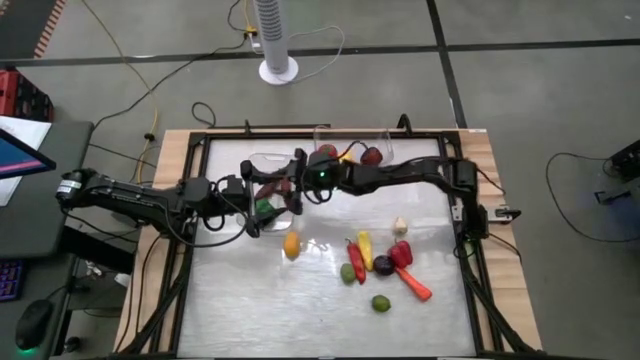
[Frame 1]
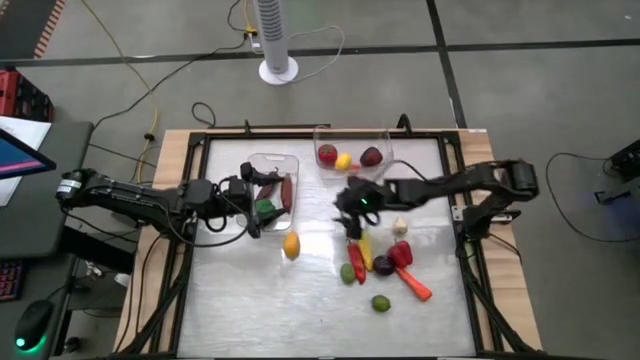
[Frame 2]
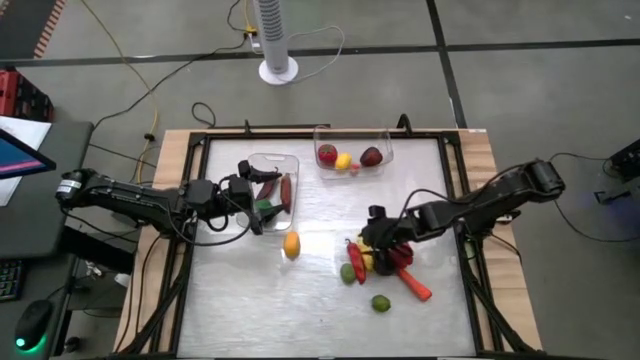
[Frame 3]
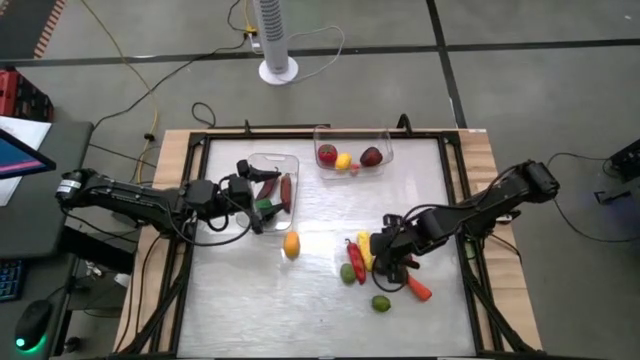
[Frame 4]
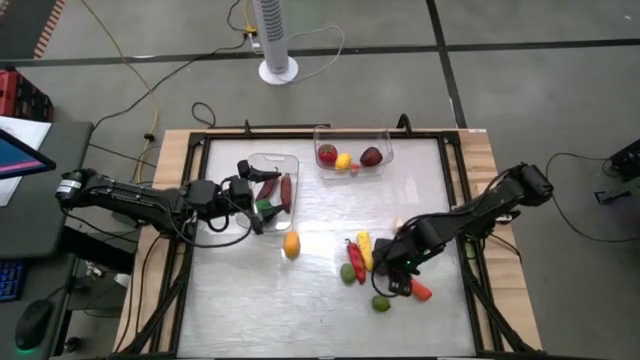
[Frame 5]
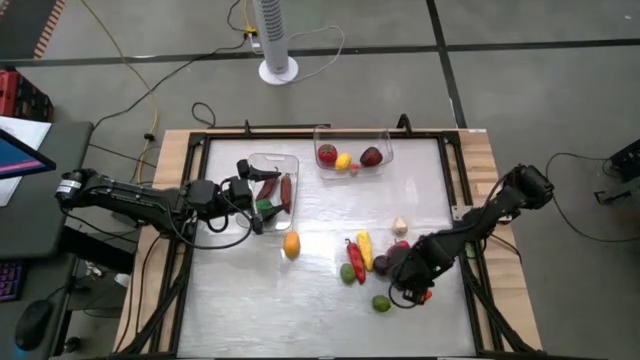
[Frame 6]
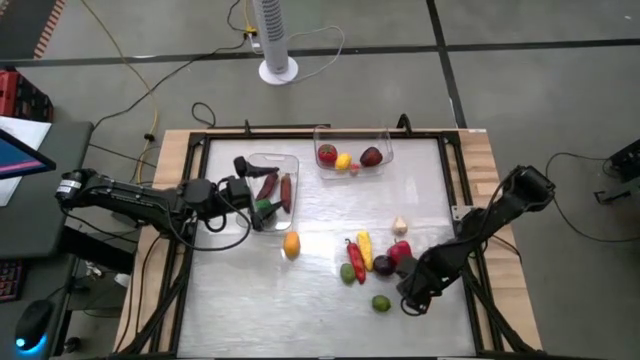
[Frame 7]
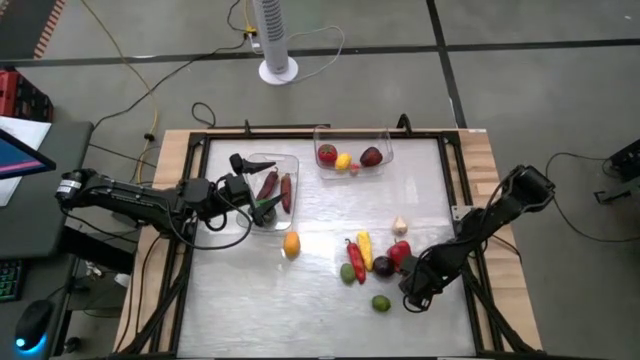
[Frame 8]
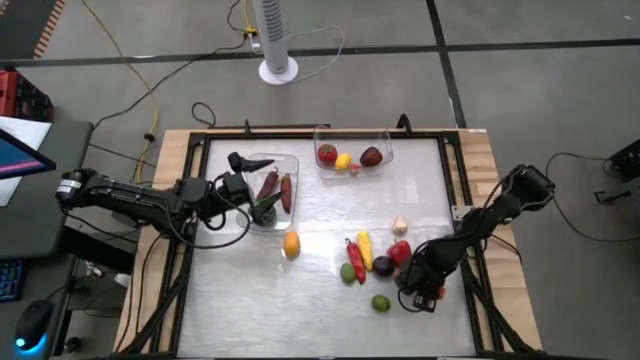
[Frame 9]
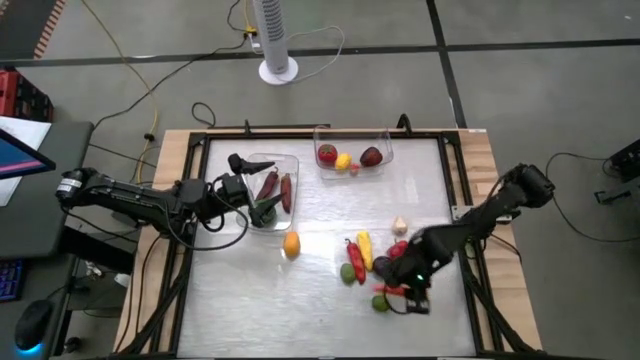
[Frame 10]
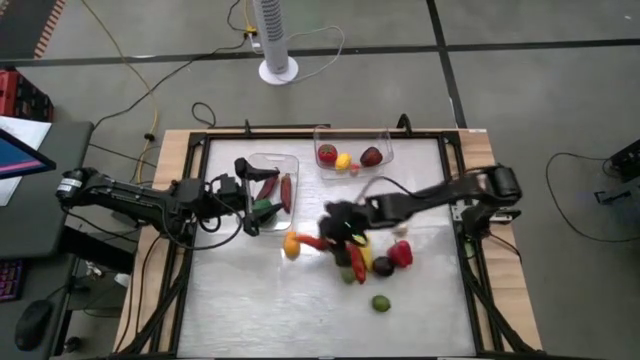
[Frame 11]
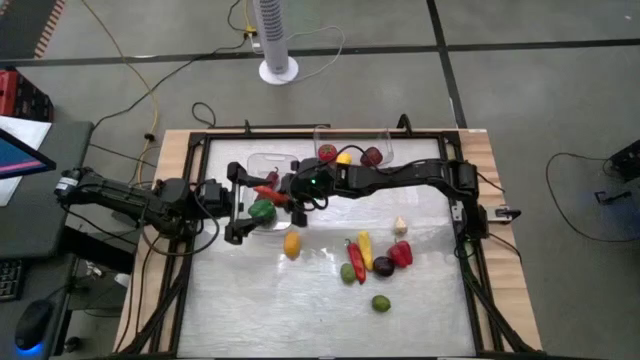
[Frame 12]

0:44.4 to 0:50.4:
Task: Sort produce into baskets
Put the orange carrot into the left transparent bin

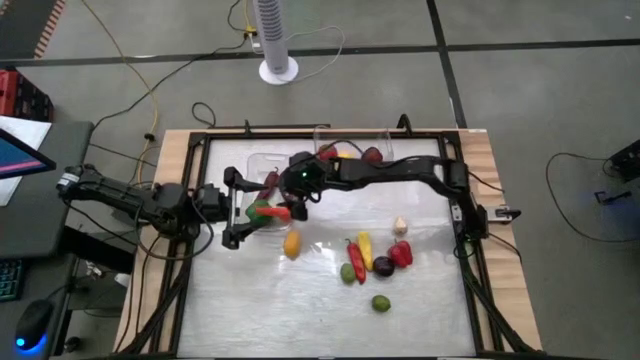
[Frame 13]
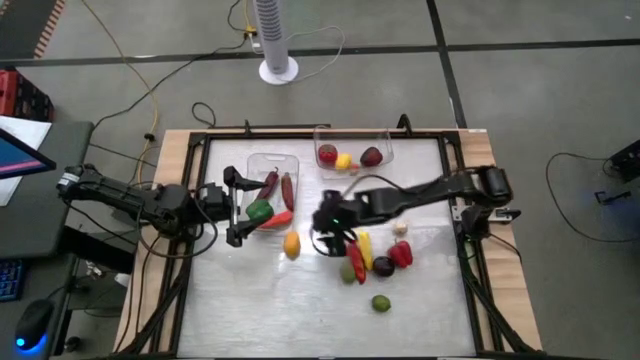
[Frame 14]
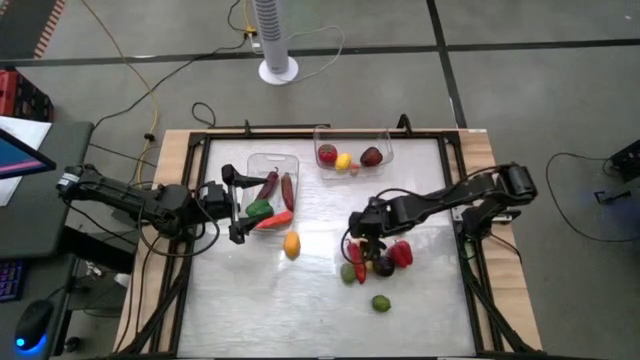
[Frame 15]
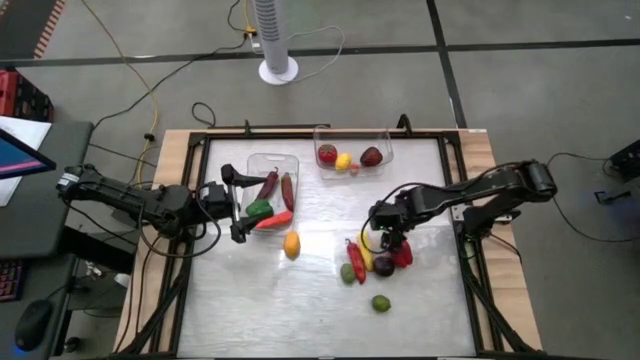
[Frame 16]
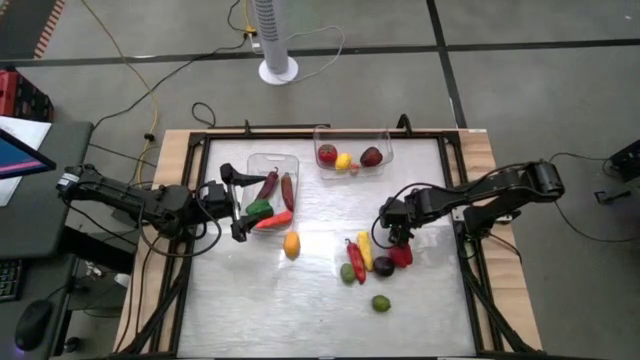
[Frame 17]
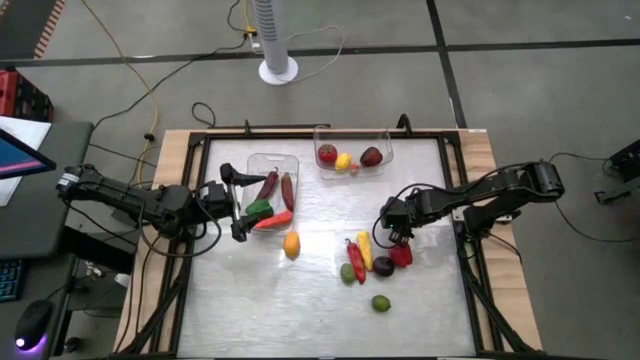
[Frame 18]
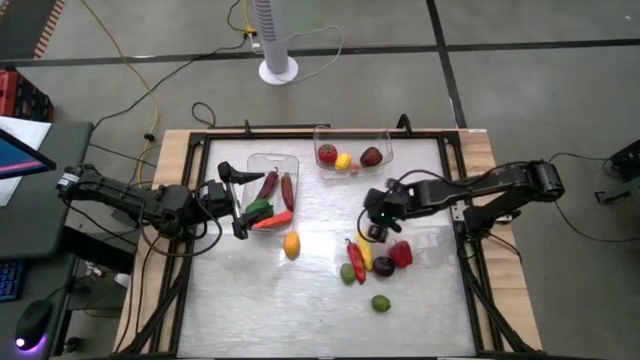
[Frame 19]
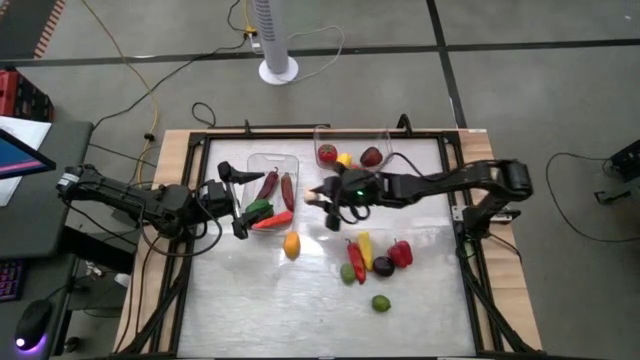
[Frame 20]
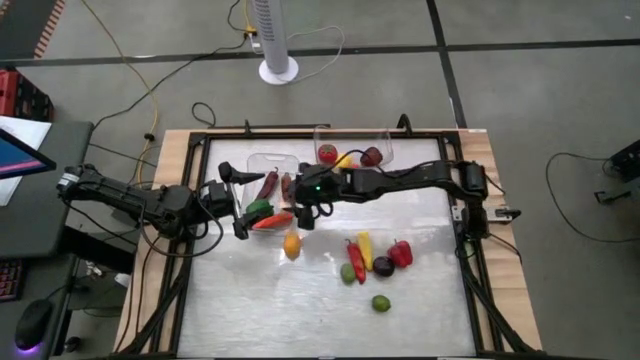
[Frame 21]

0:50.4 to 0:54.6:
Put the white garlic into the left transparent bin

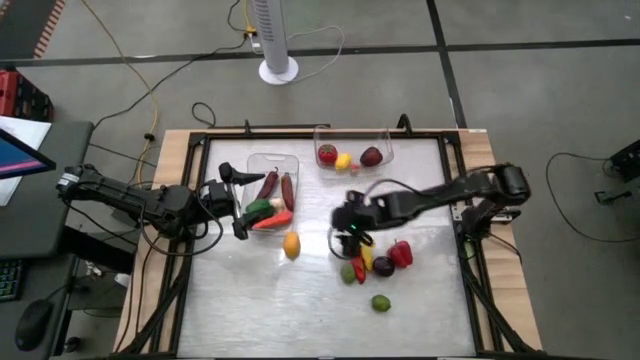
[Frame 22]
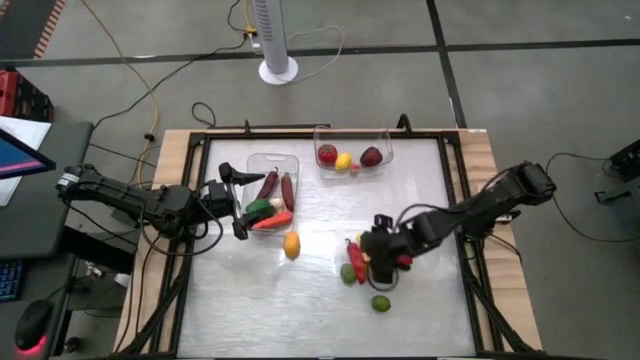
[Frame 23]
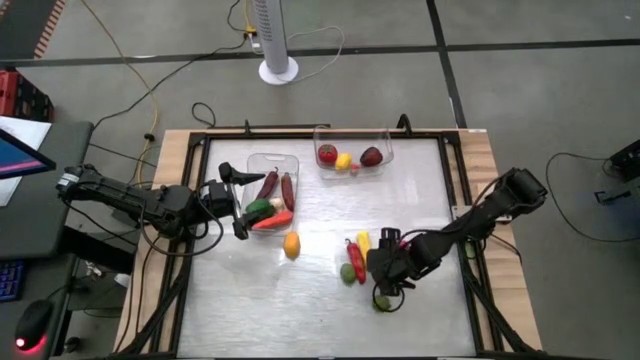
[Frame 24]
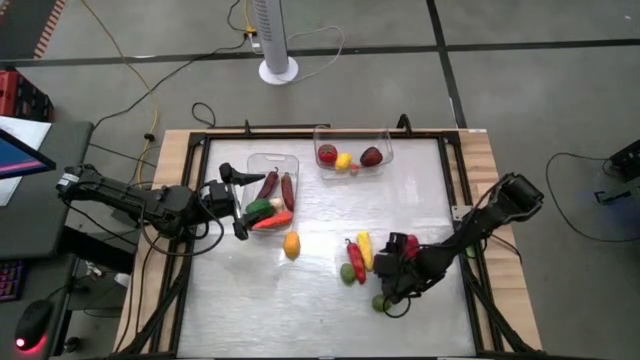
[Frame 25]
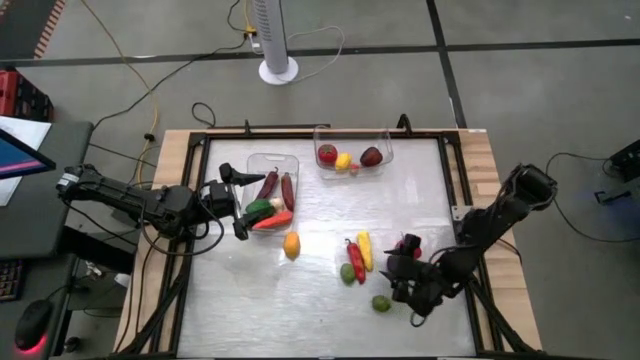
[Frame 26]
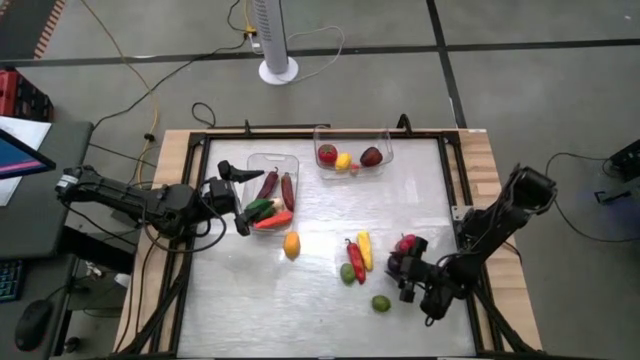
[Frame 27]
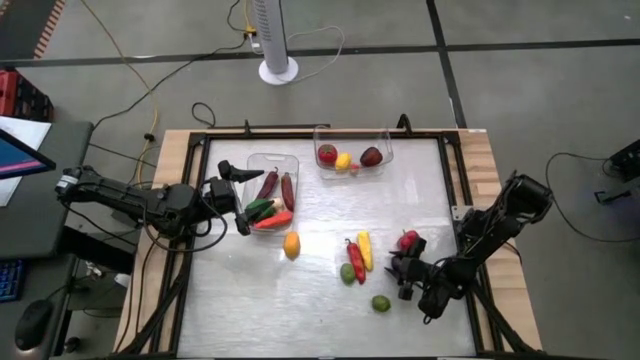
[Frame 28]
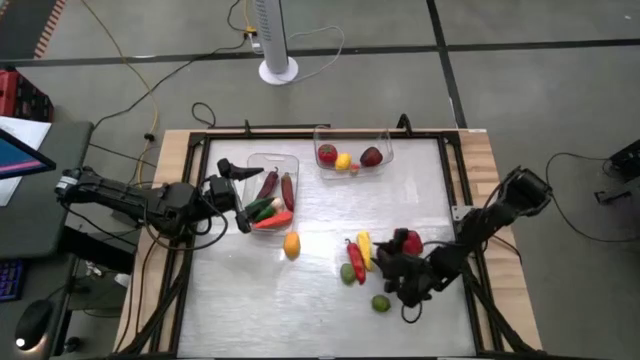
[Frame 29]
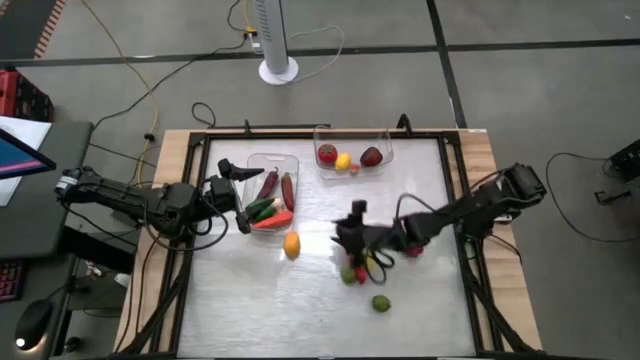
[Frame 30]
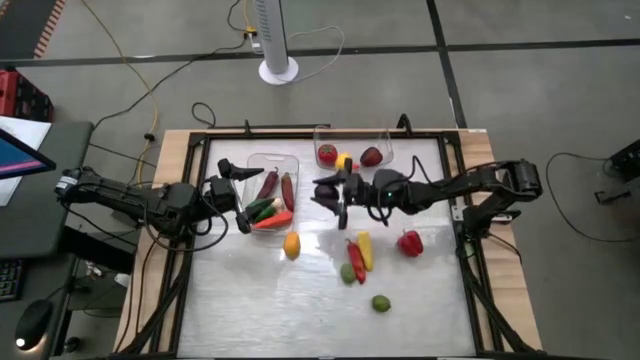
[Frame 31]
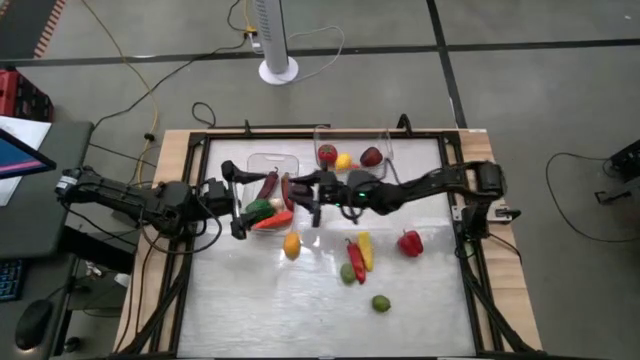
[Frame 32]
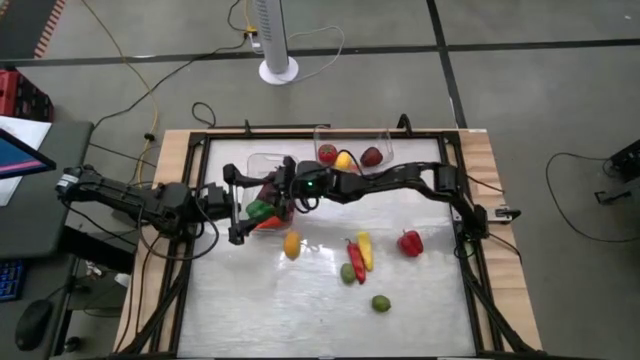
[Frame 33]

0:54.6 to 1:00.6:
Put the purple pomegranate into the left transparent bin

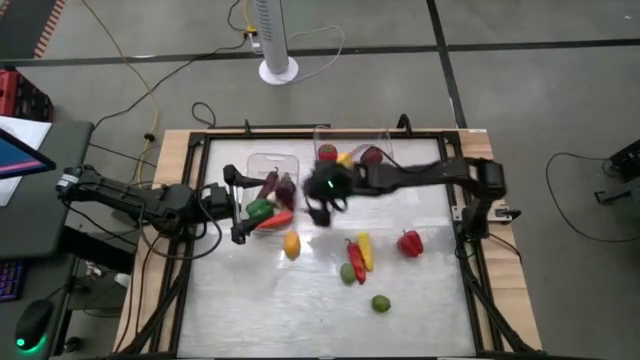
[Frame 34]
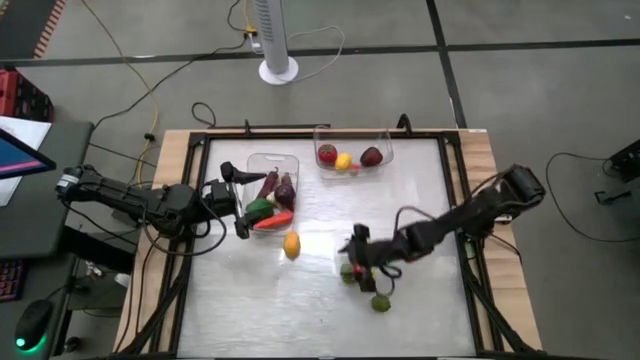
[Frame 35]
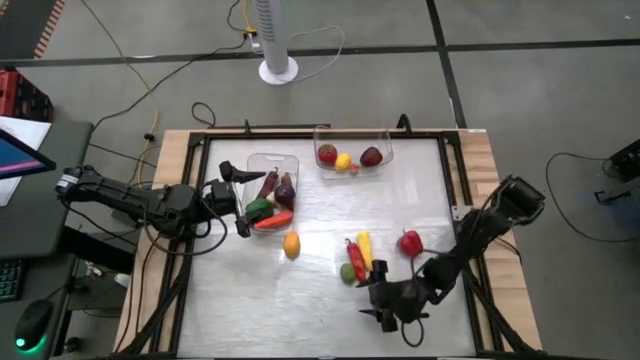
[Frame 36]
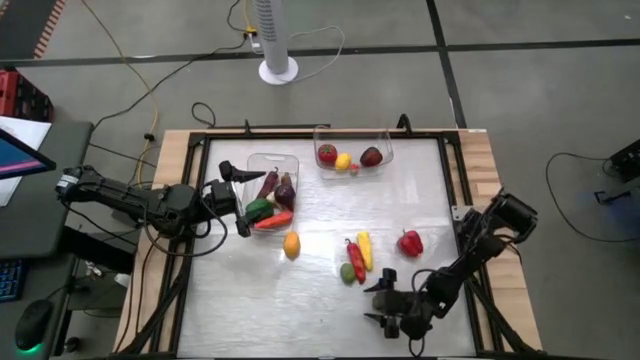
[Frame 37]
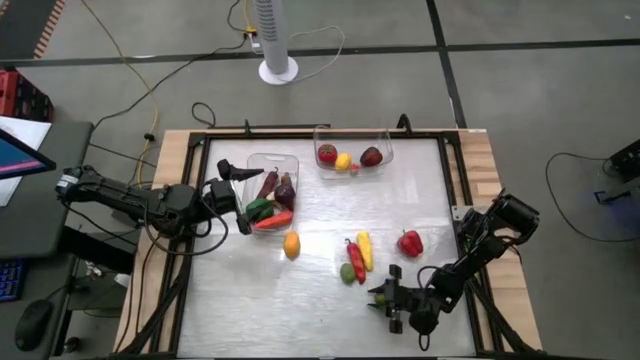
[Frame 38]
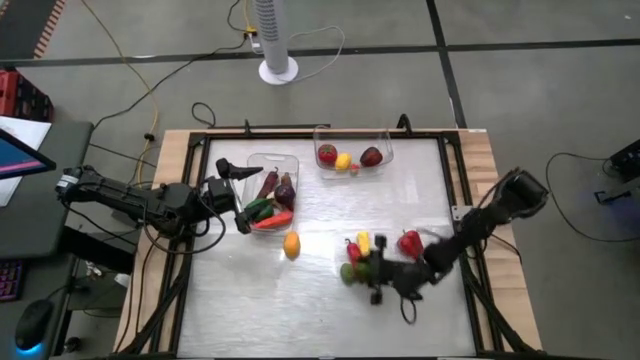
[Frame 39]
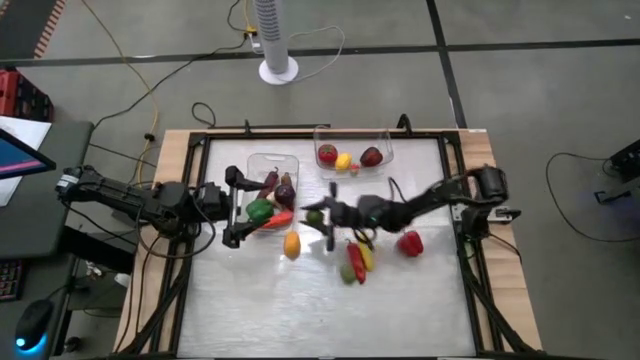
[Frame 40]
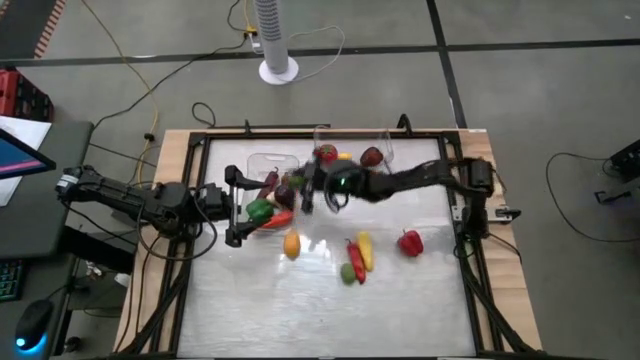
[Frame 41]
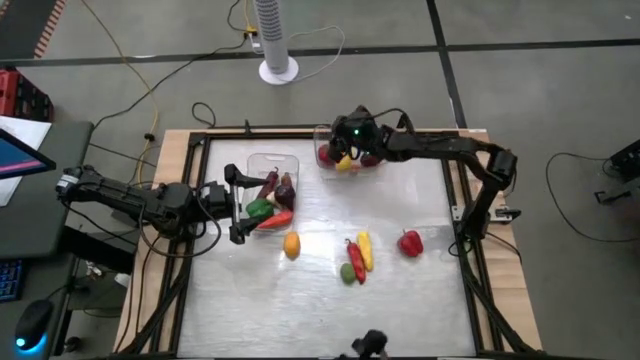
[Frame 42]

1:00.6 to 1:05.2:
Put the bottom green lime into the right transparent bin
